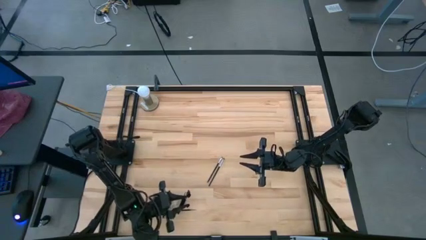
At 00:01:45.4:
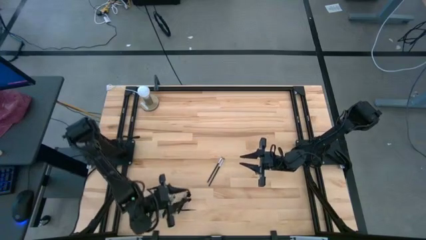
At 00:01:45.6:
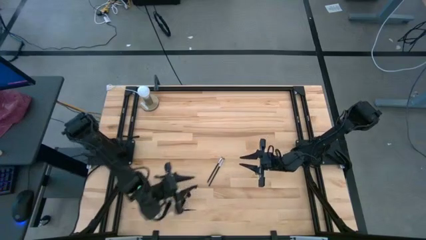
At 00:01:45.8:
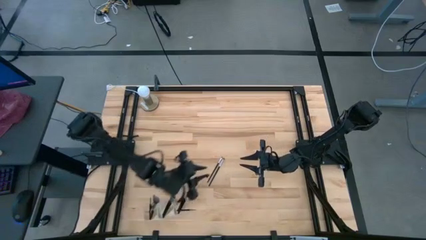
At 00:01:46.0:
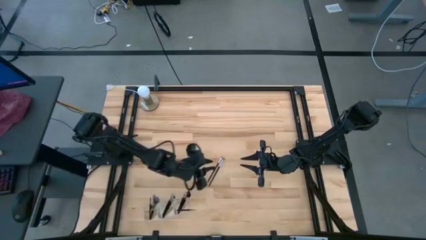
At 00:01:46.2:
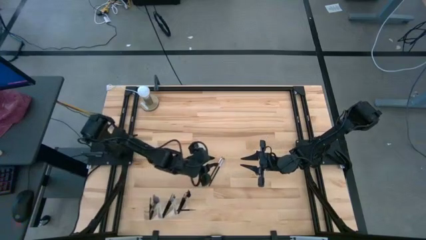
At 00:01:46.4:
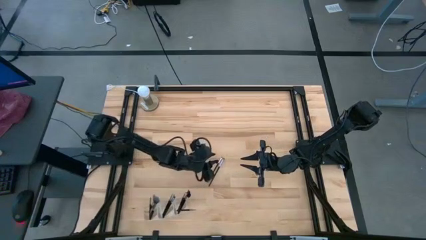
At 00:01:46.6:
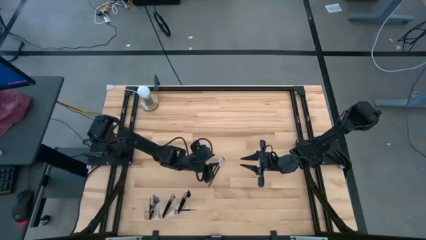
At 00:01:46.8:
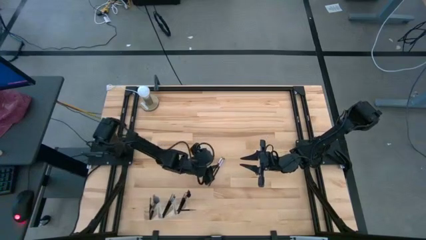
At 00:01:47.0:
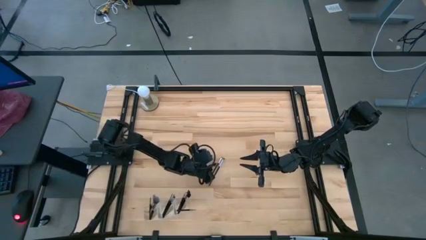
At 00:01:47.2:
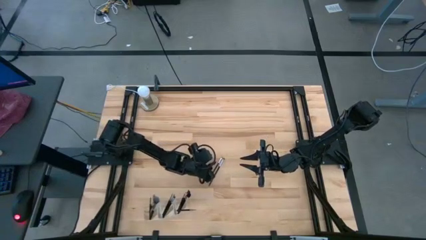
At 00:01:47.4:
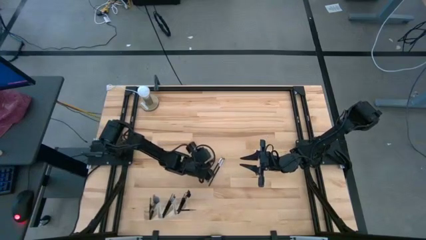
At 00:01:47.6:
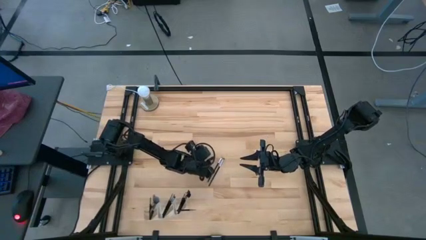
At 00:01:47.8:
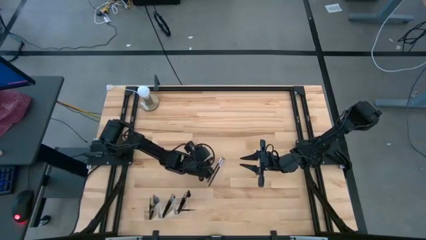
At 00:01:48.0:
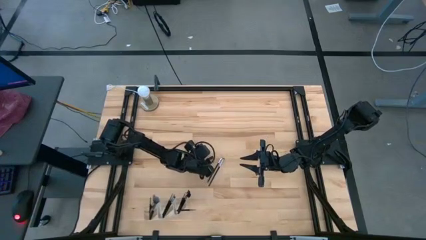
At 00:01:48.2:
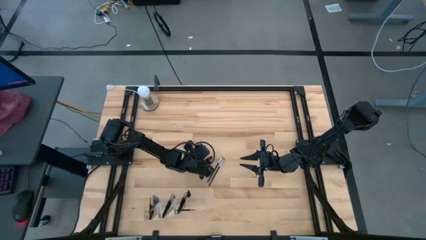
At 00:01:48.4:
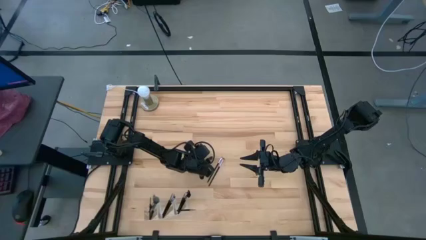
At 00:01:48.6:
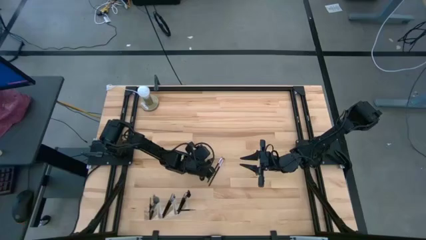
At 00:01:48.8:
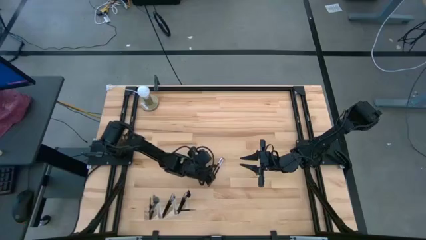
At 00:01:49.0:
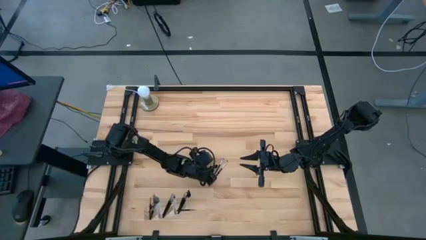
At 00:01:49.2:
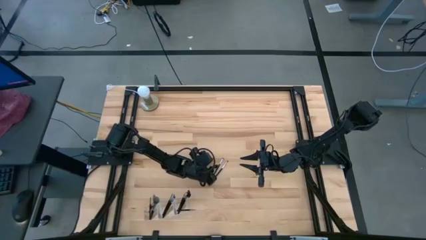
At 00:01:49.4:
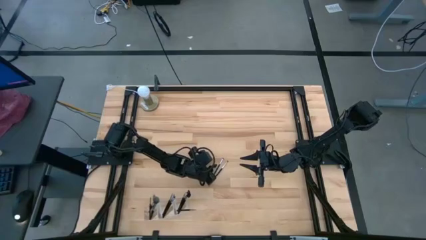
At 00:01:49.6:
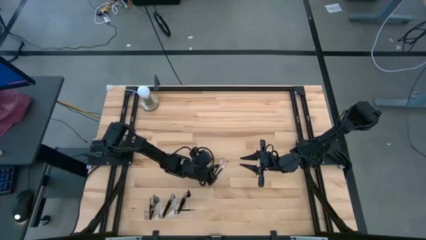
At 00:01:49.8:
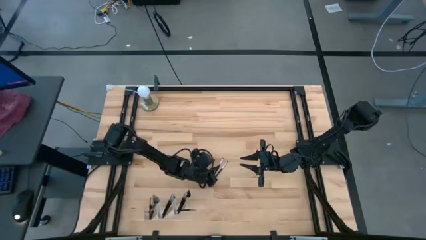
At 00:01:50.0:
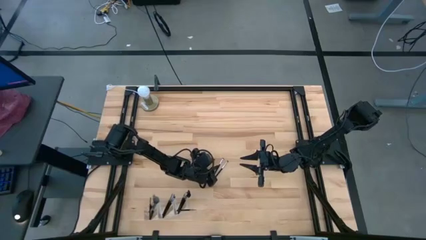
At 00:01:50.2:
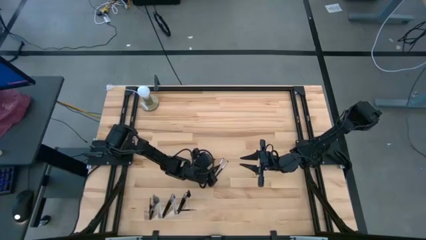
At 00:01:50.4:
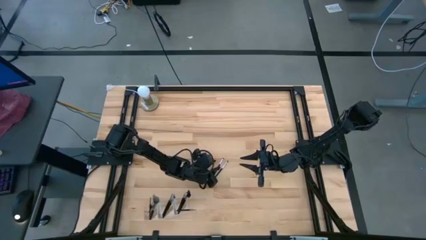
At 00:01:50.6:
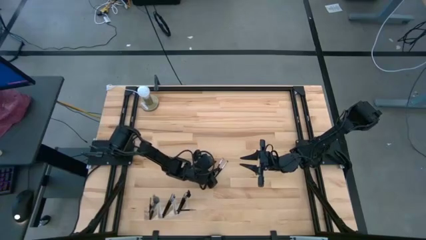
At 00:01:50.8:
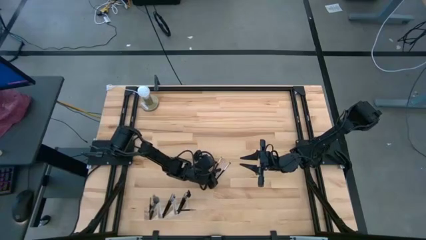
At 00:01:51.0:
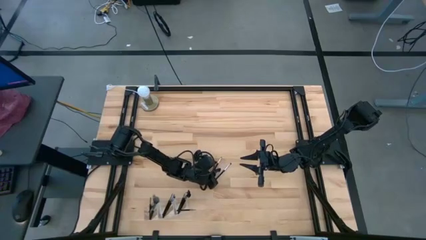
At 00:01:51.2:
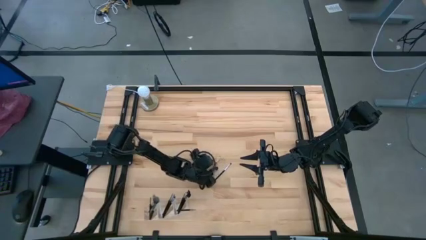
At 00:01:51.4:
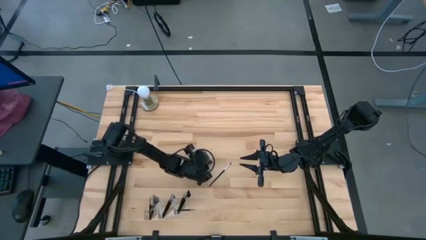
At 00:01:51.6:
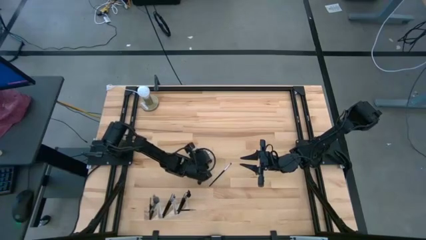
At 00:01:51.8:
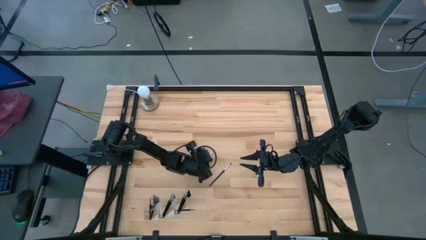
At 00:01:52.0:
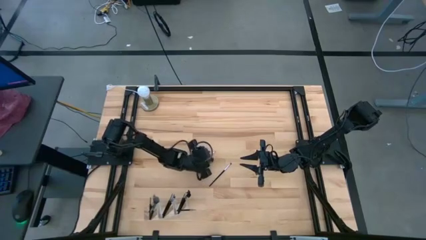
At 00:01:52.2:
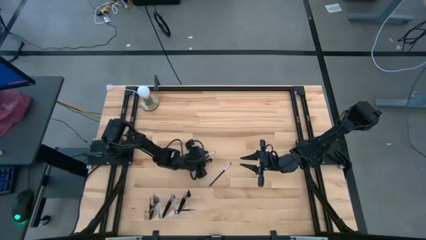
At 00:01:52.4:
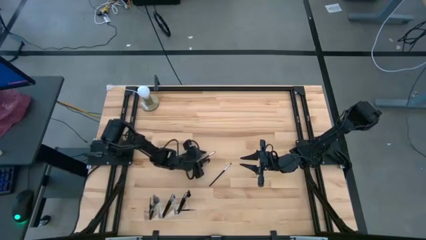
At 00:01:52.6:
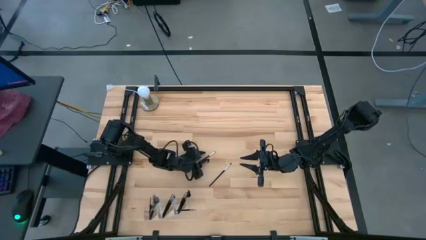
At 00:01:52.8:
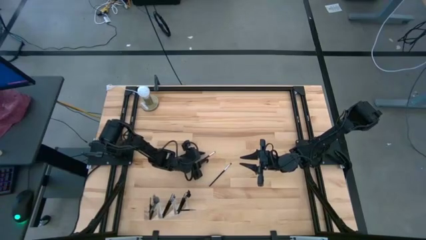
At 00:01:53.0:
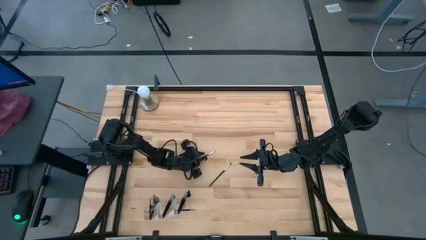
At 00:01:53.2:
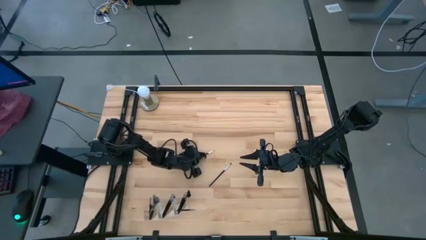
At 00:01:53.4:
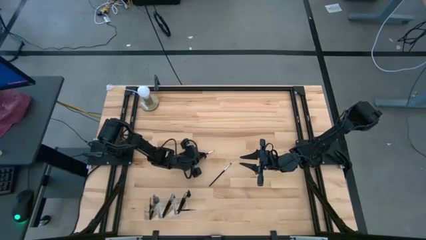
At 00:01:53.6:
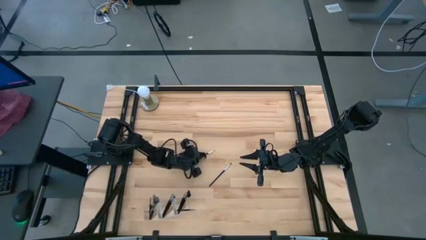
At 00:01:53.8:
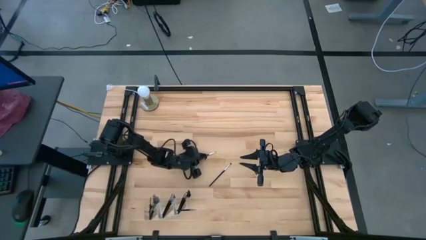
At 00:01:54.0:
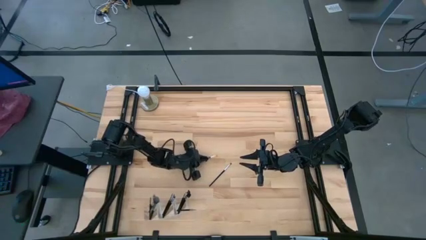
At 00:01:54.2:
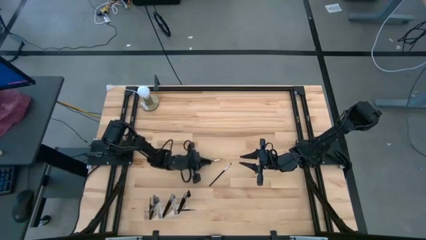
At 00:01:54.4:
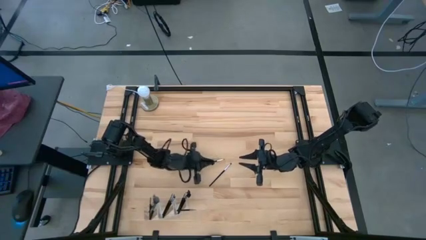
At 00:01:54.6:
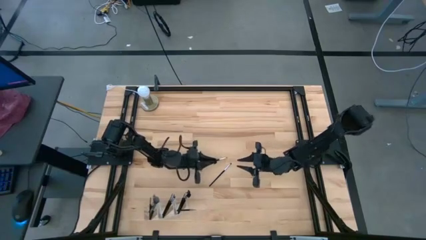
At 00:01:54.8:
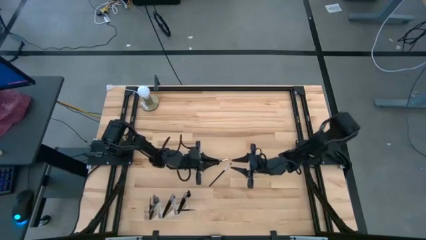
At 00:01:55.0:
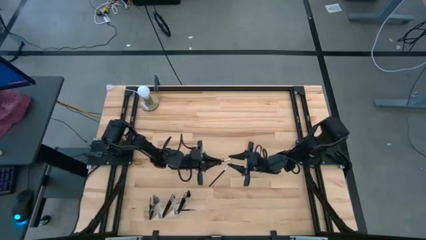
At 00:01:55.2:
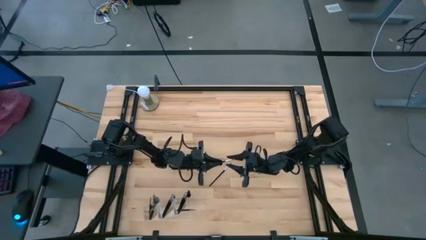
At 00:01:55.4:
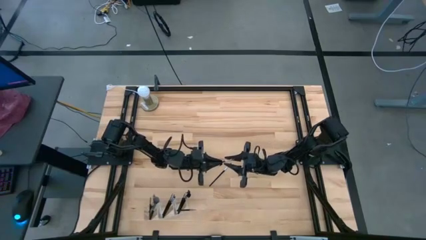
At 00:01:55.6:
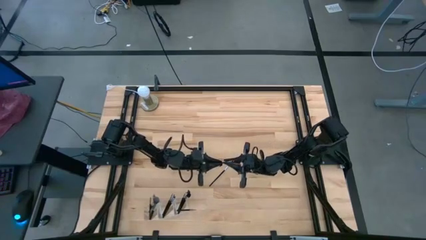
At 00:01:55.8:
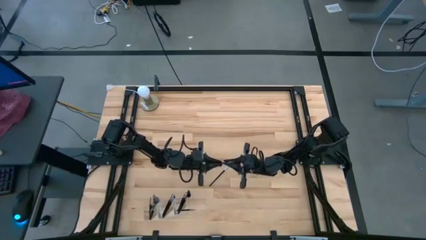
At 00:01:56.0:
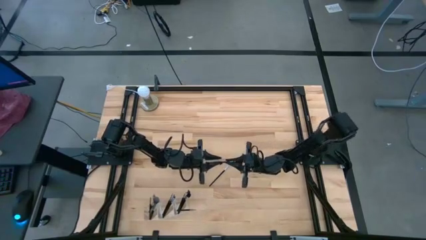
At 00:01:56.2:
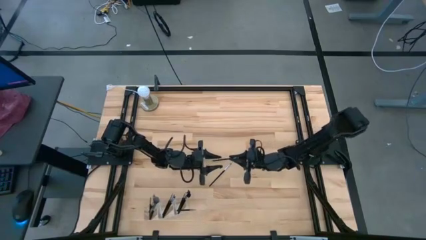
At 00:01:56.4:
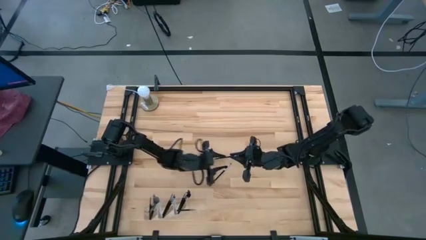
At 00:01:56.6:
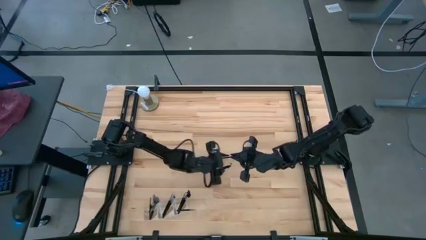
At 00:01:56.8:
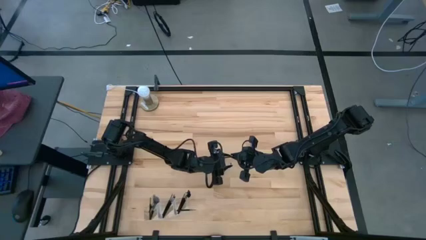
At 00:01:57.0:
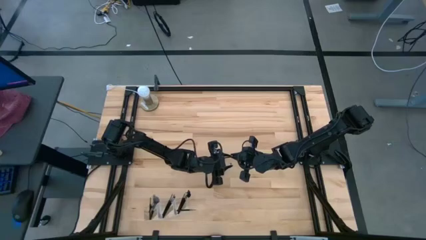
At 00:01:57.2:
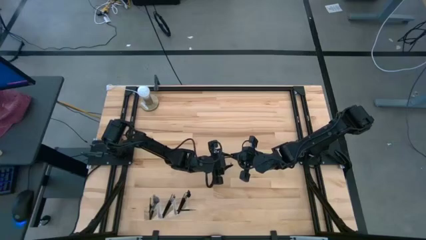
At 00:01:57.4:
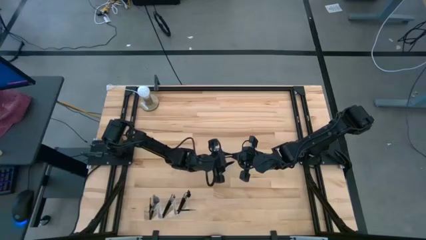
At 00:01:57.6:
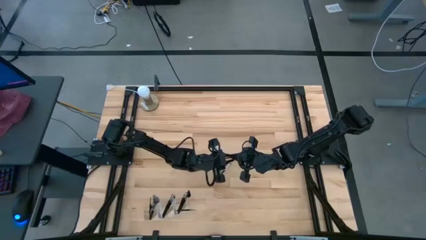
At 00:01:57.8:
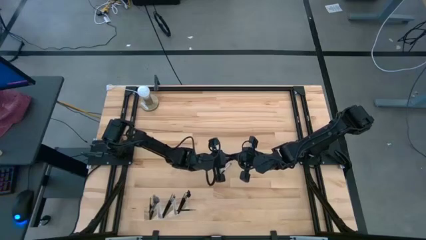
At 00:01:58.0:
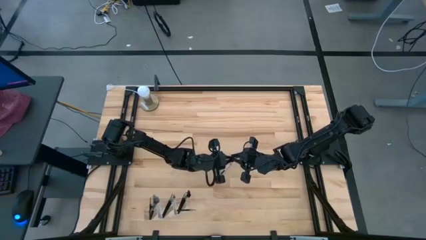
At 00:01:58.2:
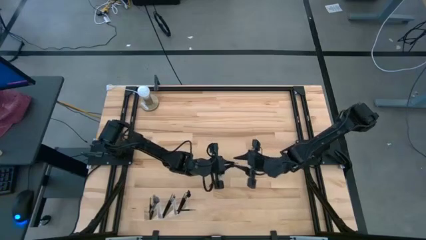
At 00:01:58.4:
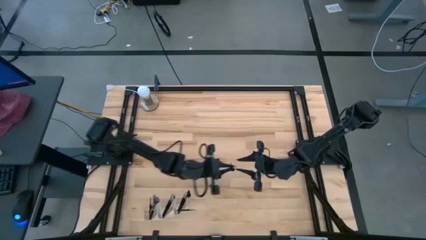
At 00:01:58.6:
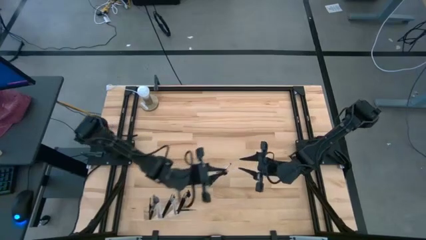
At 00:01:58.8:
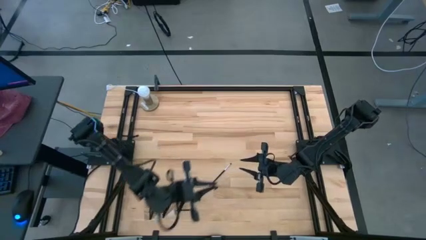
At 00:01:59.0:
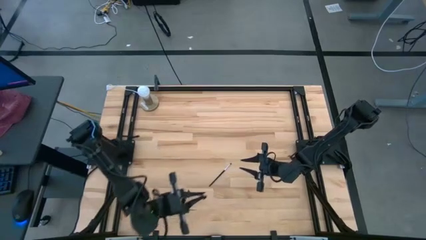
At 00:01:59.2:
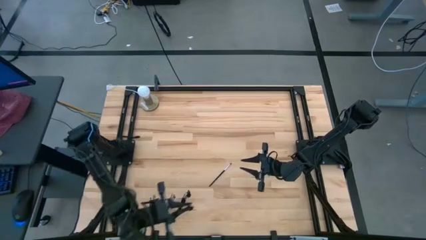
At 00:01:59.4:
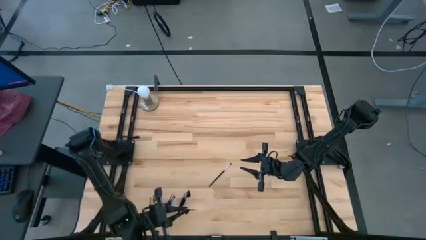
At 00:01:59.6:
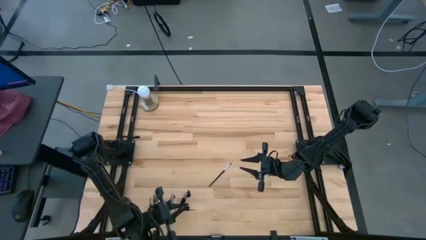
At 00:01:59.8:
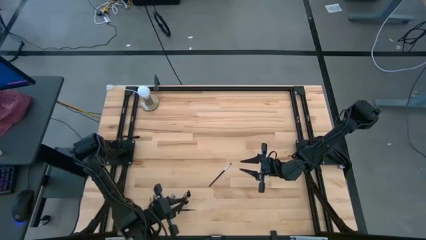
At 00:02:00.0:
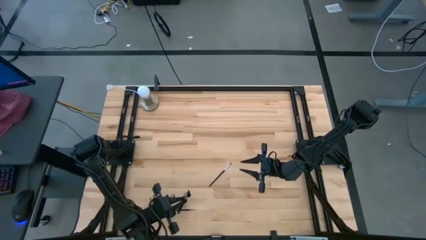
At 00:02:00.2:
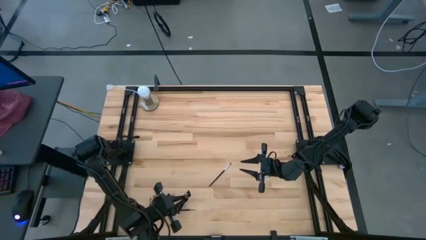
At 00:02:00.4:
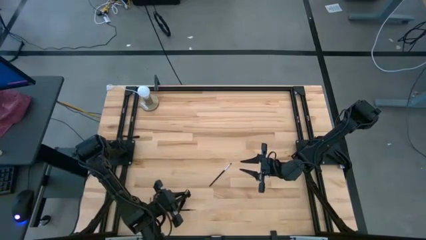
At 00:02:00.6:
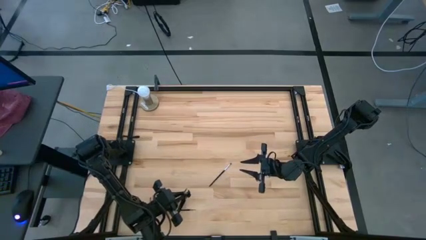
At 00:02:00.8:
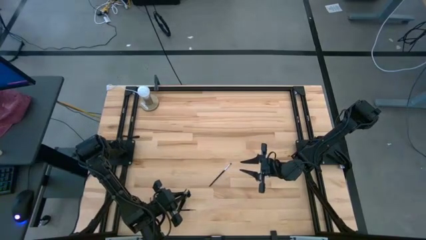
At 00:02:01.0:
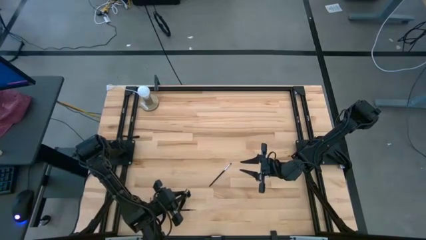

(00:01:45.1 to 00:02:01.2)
Task: Put items in baskets/containers
Put the black eyeshadow brush into the transparent organizer
